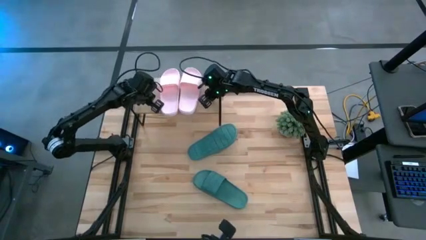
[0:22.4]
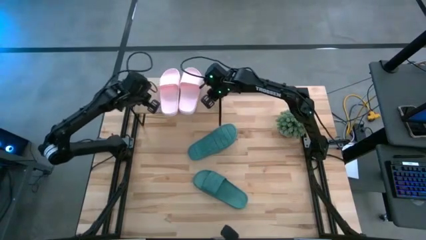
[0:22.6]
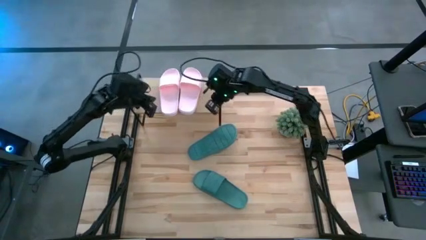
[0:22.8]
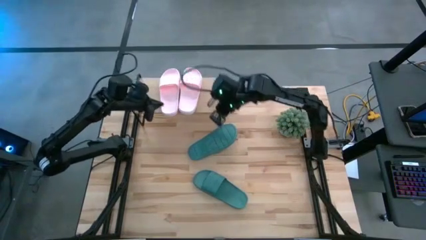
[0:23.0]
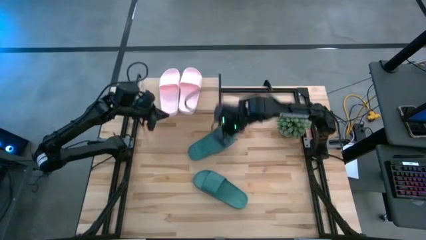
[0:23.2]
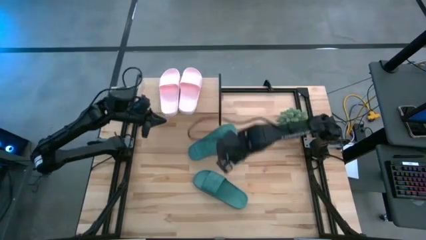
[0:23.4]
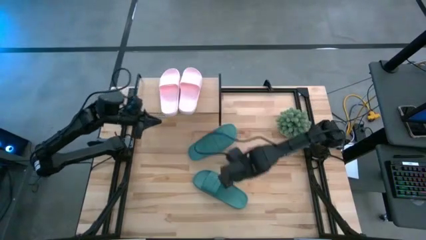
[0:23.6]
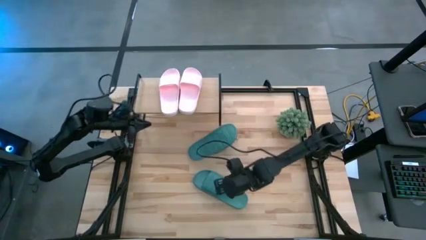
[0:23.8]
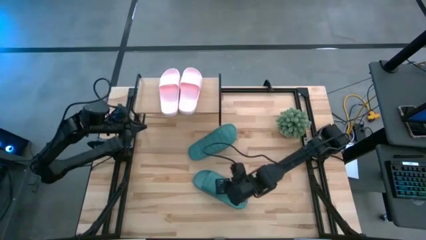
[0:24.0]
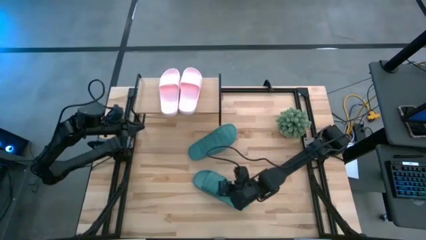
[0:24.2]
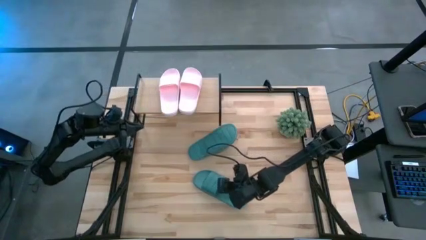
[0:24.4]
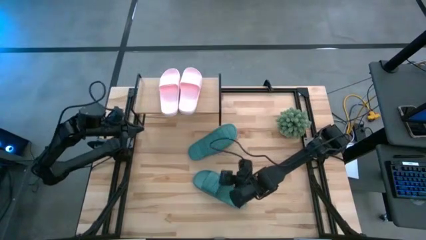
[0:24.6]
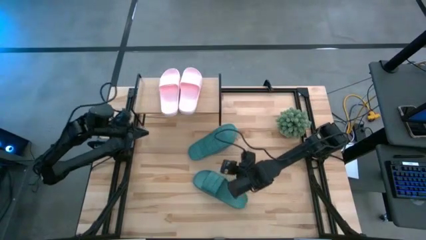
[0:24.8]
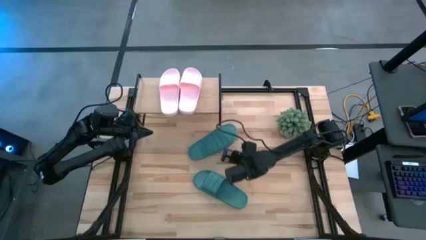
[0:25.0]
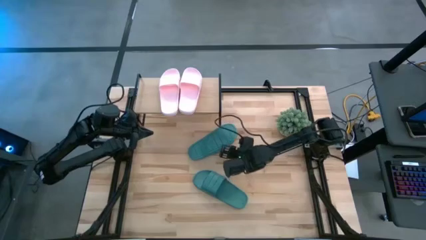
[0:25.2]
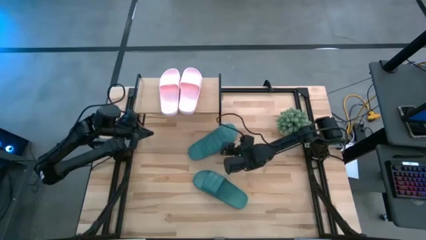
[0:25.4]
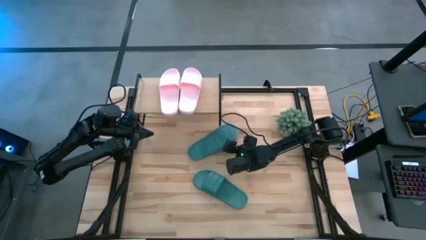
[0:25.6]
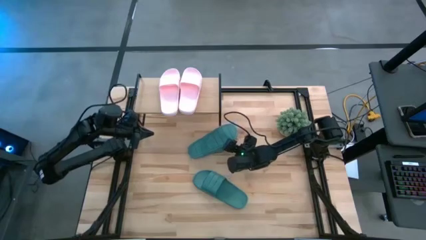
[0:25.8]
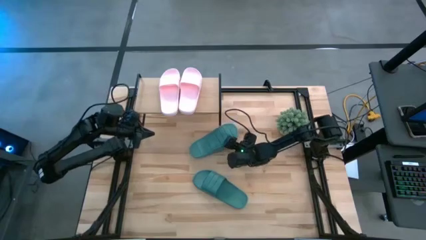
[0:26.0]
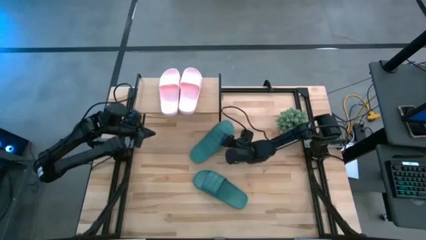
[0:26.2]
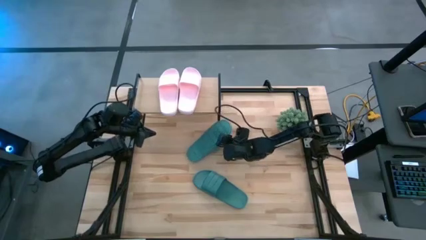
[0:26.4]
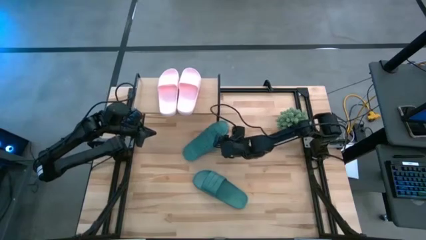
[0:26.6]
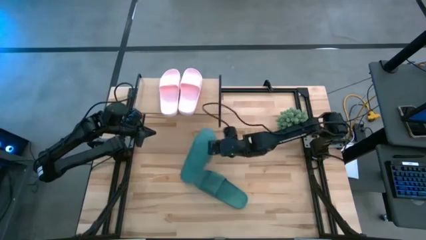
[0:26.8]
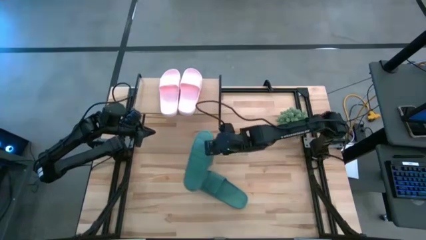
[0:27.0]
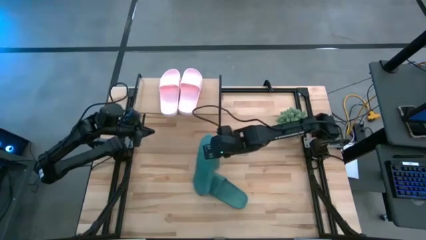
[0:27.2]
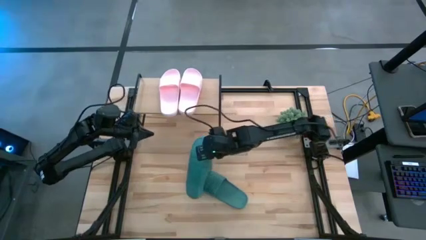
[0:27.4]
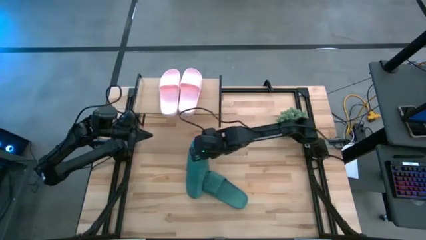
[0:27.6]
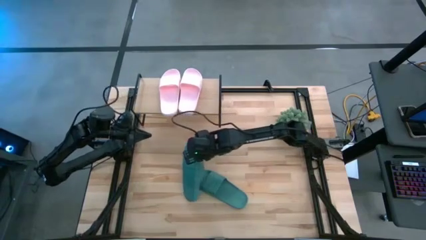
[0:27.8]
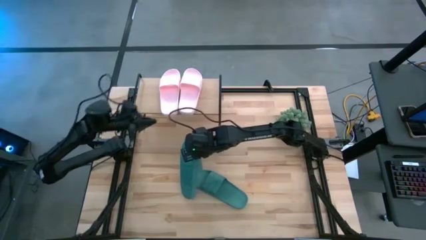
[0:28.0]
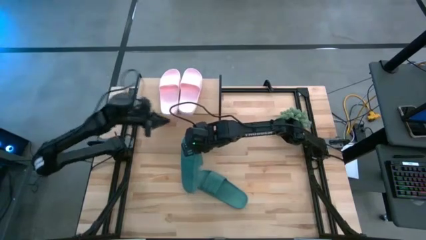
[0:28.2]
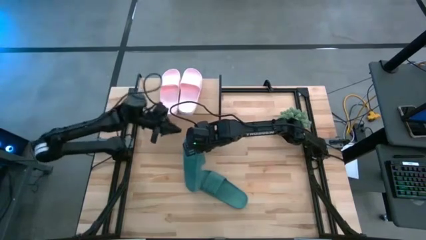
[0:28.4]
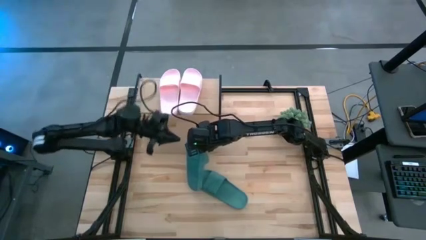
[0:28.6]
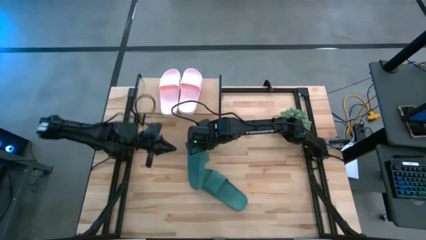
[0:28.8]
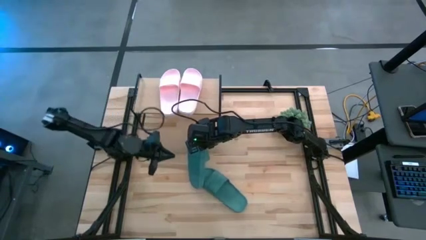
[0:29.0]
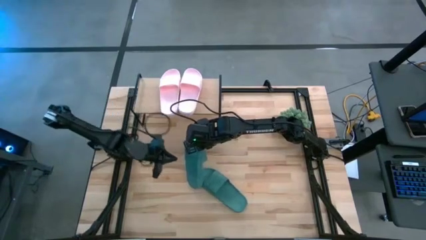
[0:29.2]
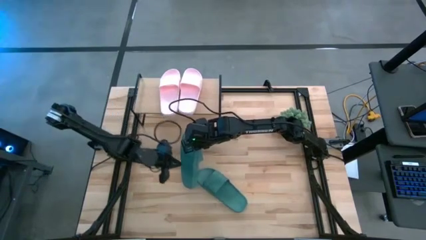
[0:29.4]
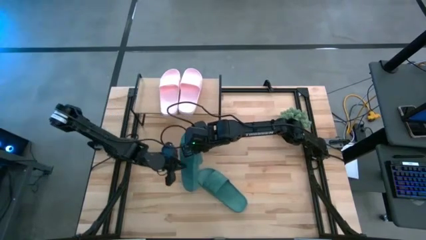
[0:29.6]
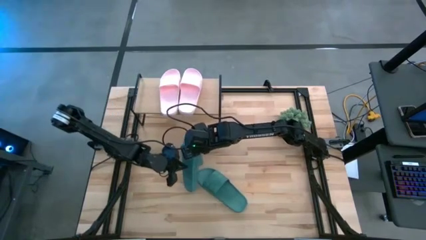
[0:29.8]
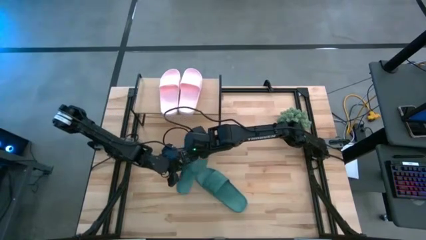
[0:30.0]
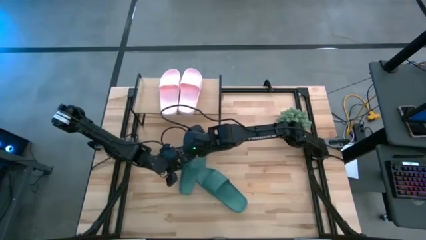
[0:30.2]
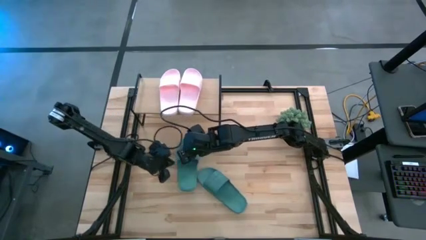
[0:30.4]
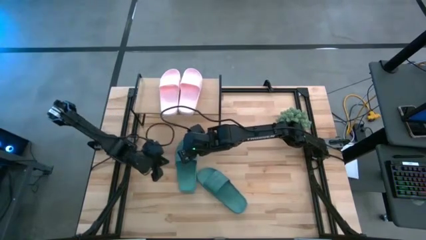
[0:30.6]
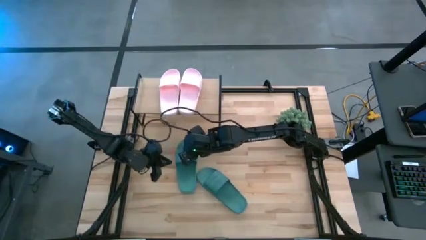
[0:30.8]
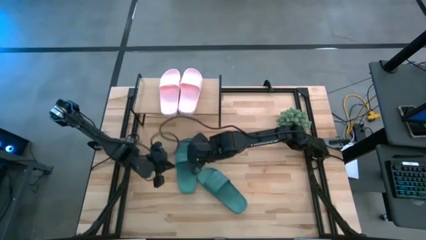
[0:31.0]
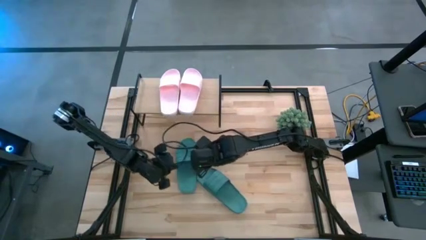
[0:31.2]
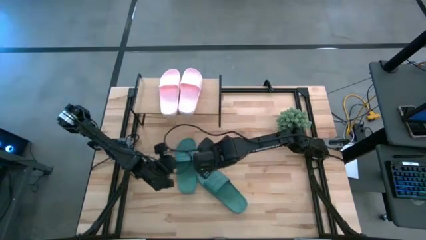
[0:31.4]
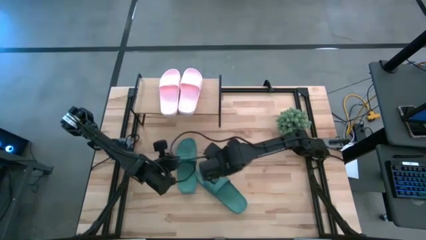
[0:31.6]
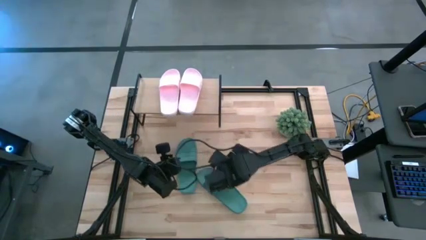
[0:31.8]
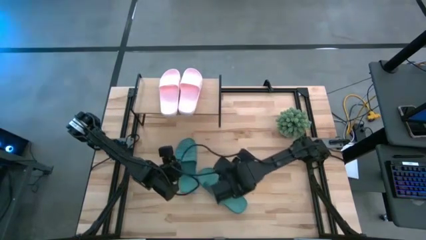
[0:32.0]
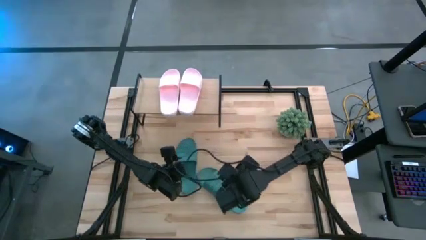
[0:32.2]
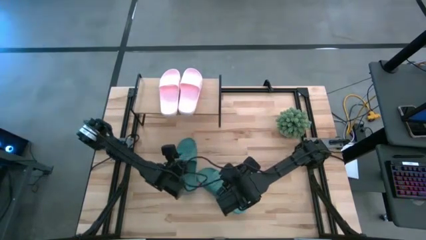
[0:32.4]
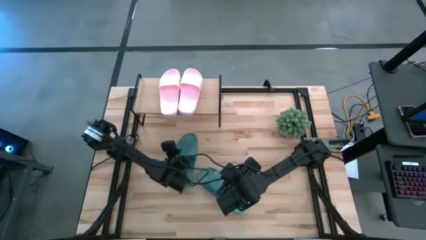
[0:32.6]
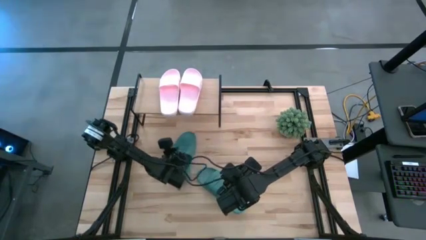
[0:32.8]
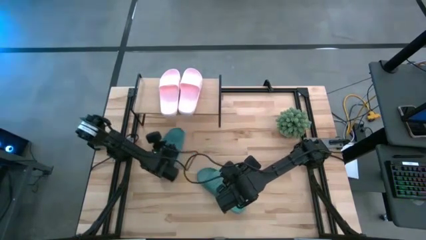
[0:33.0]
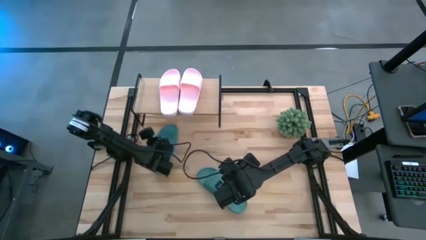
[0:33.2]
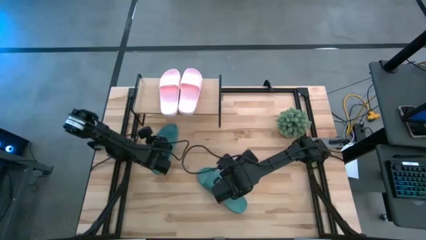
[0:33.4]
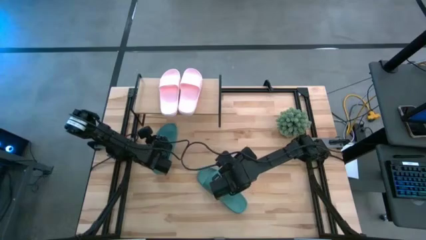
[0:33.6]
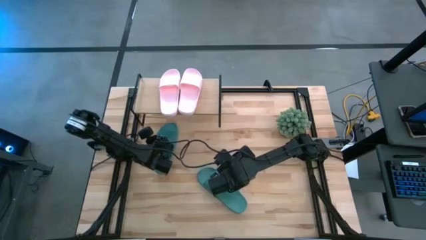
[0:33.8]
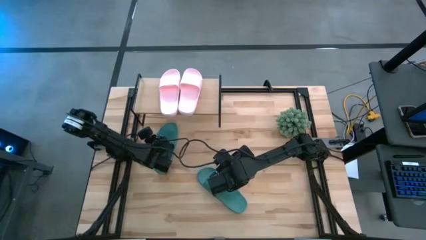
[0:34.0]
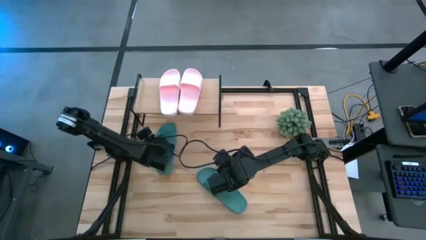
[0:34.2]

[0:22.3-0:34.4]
Task: Pick and place slides into the shelf
Adjust the right green slipper
